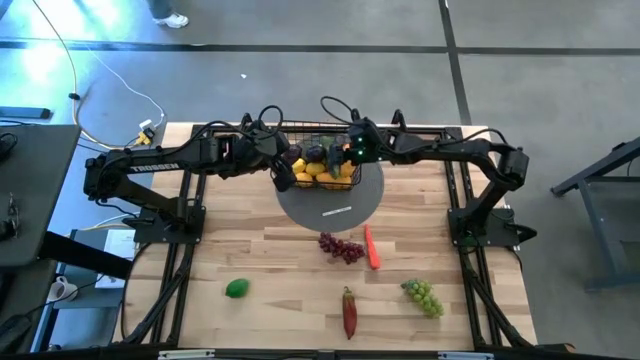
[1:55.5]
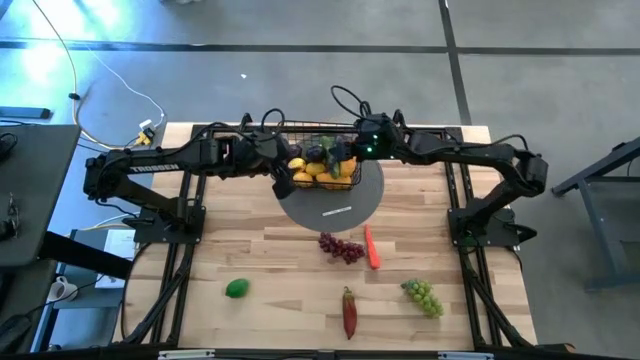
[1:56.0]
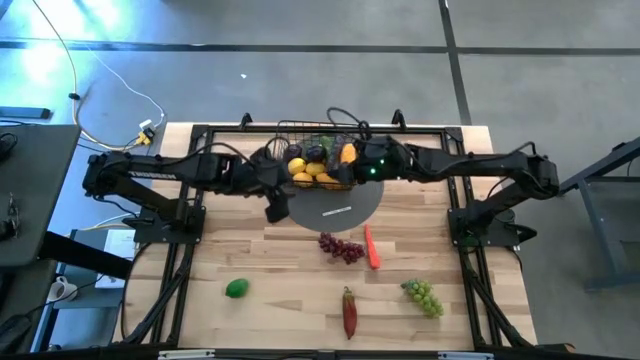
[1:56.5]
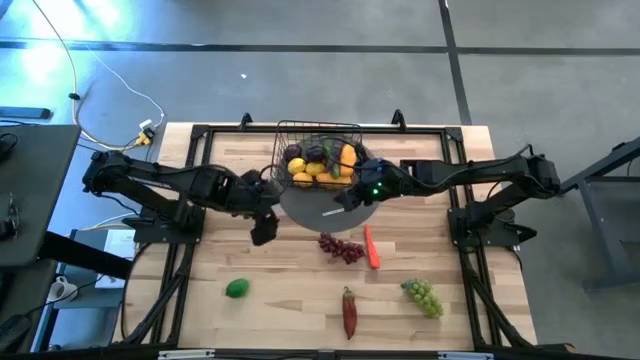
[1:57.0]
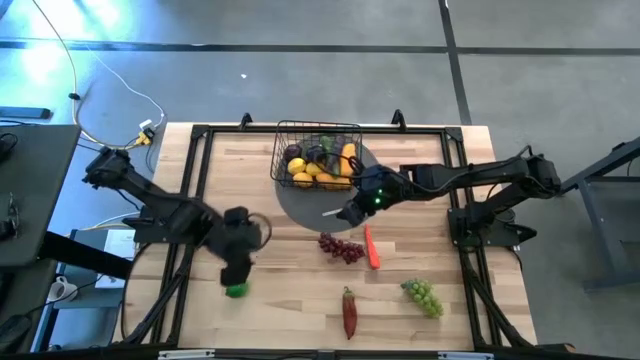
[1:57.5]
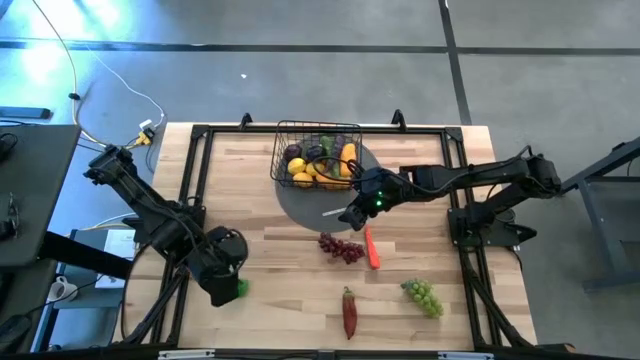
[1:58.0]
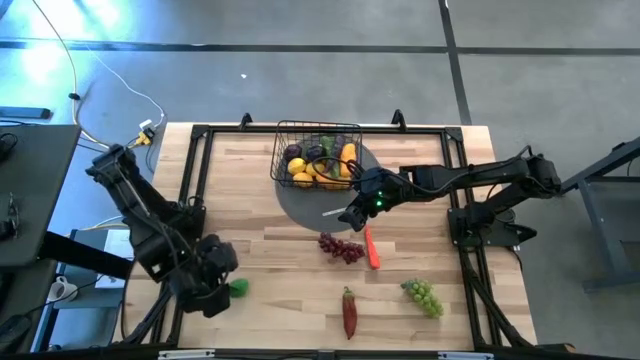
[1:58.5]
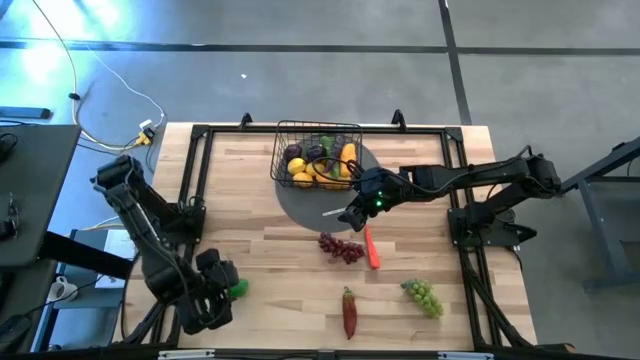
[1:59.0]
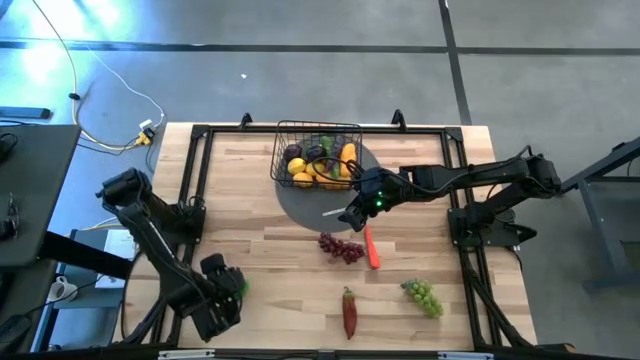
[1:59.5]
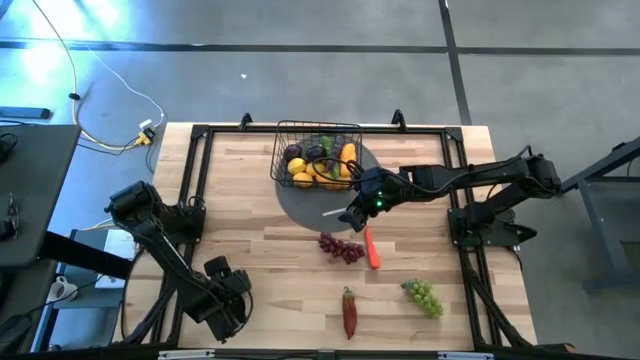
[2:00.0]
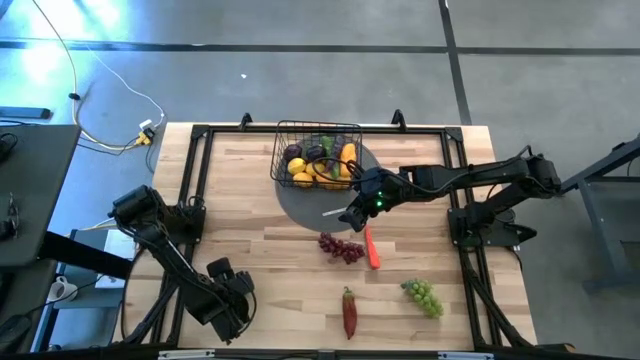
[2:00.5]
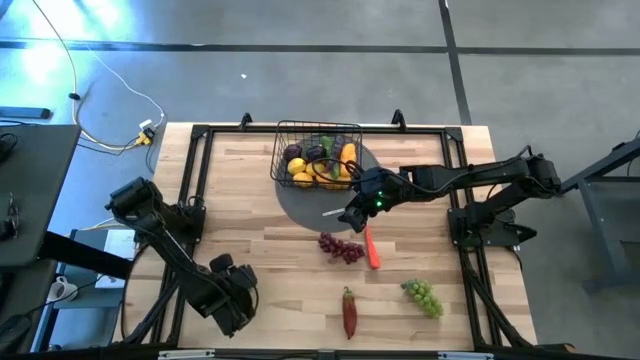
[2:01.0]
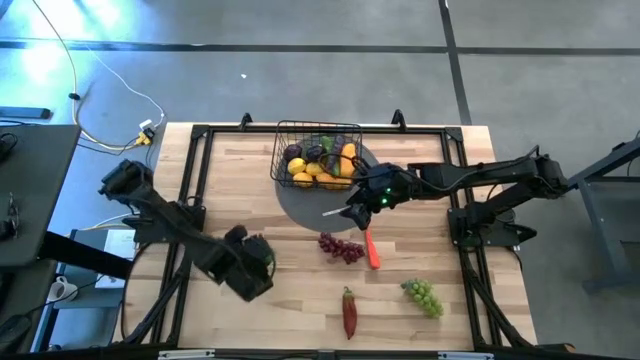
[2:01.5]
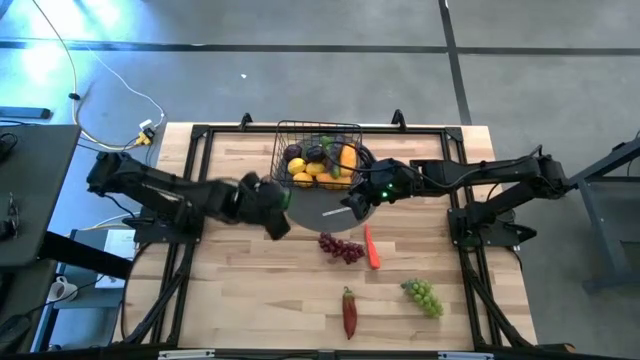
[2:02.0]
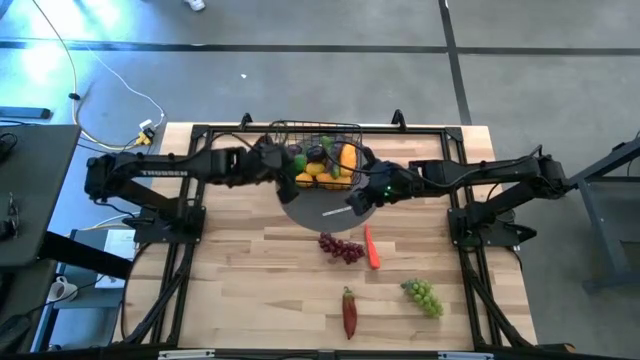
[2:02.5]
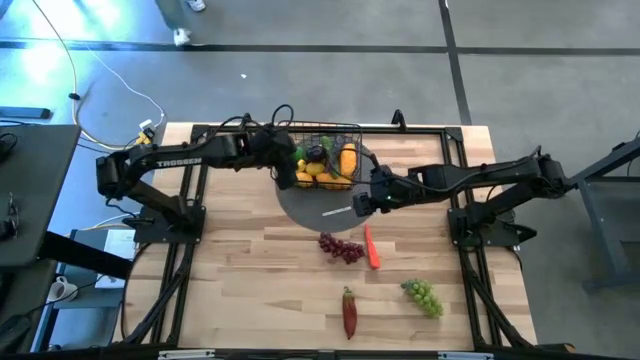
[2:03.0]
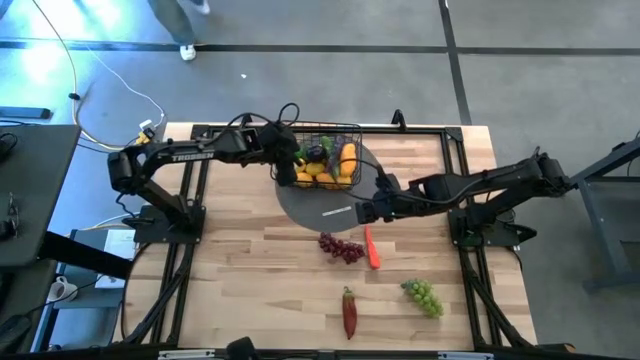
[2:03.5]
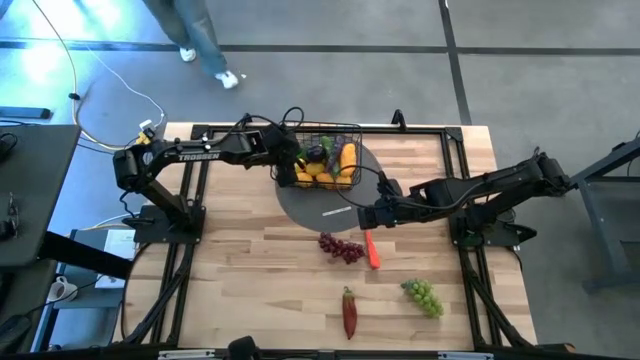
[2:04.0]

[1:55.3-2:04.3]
Task: Build produce basket
Put the green lime into the black wire basket

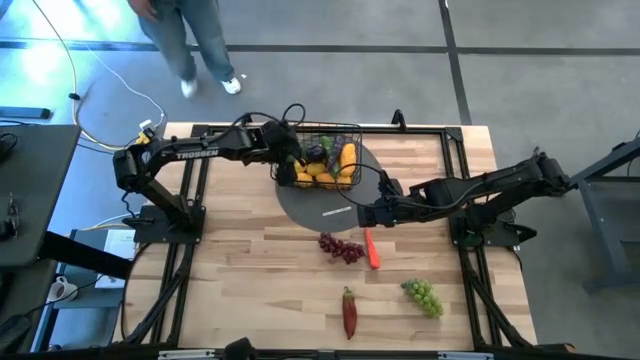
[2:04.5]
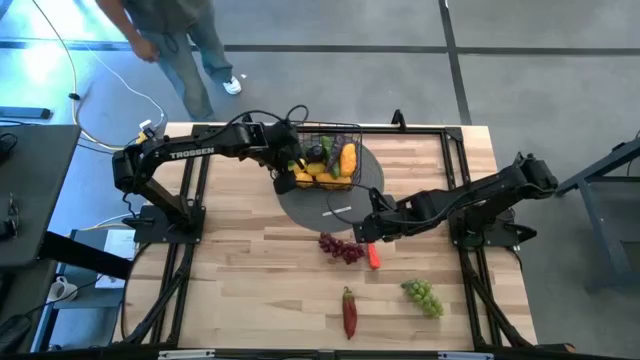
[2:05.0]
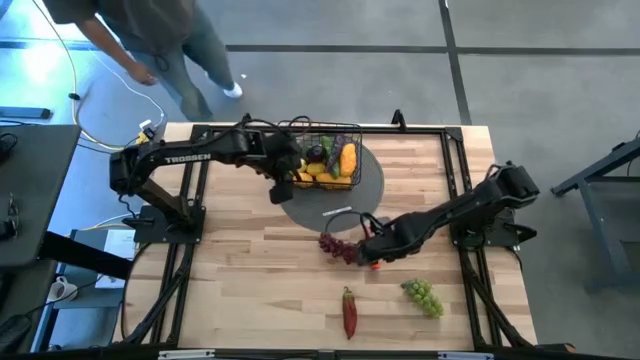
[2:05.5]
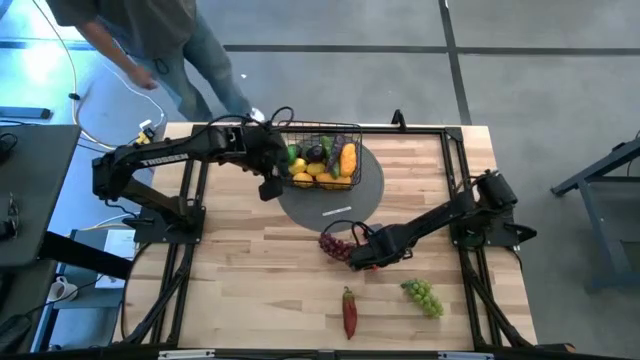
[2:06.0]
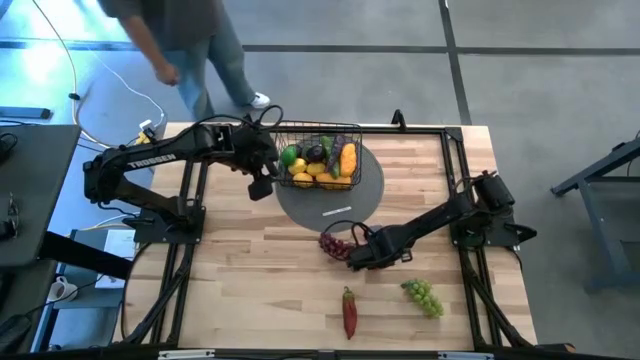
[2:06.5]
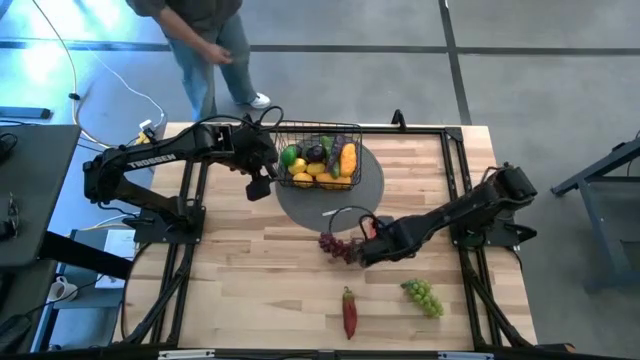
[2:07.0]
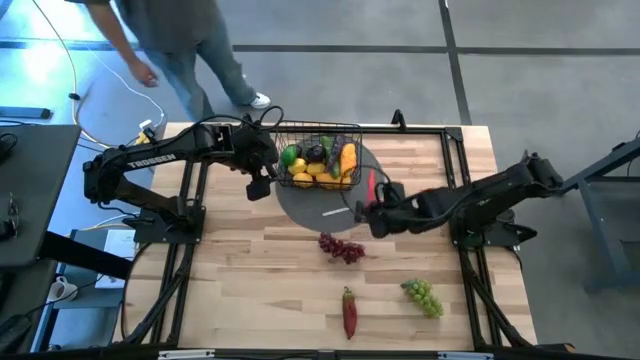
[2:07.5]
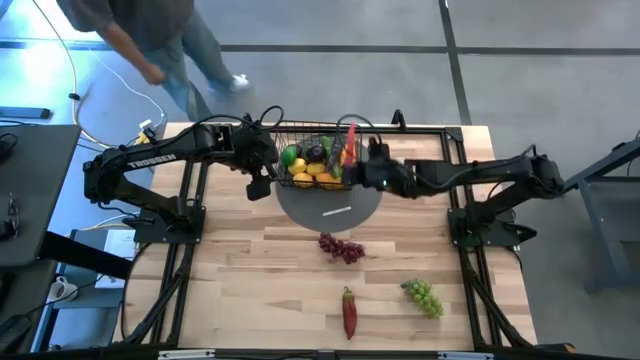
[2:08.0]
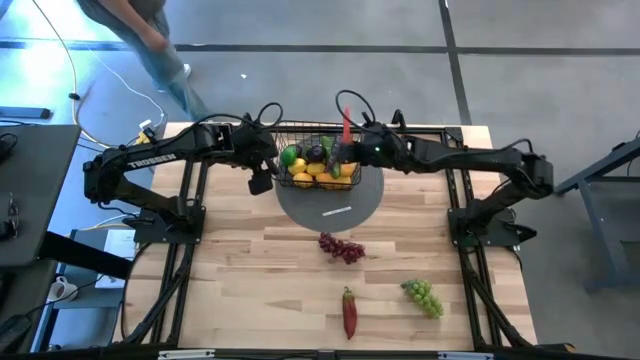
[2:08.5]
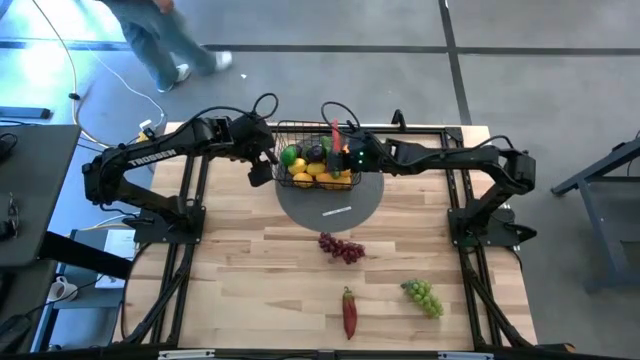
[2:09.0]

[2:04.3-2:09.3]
Put the orange carrot into the black wire basket

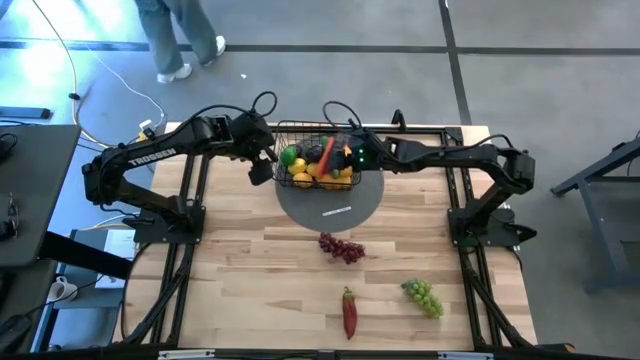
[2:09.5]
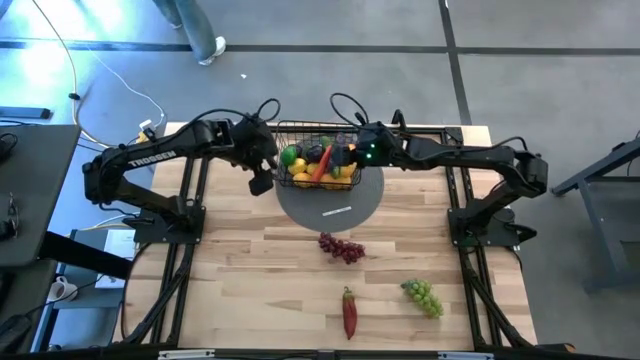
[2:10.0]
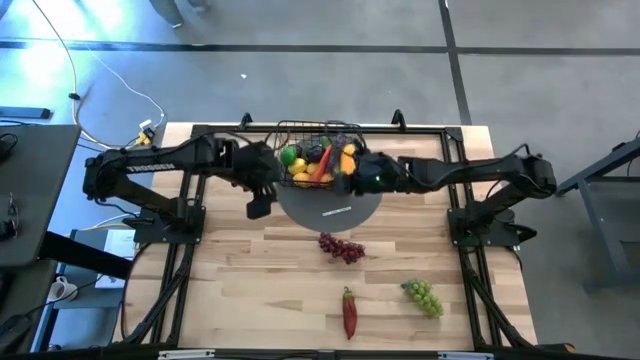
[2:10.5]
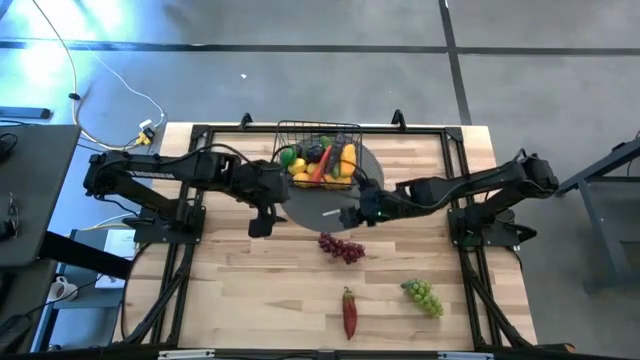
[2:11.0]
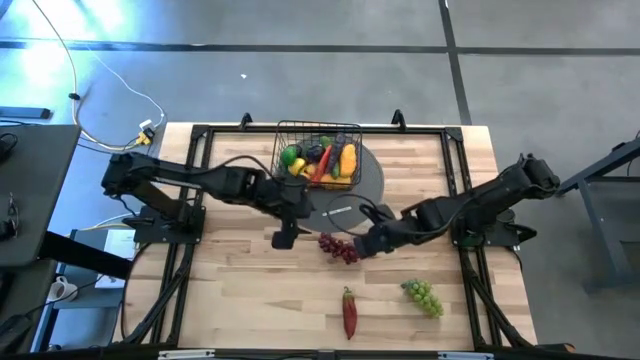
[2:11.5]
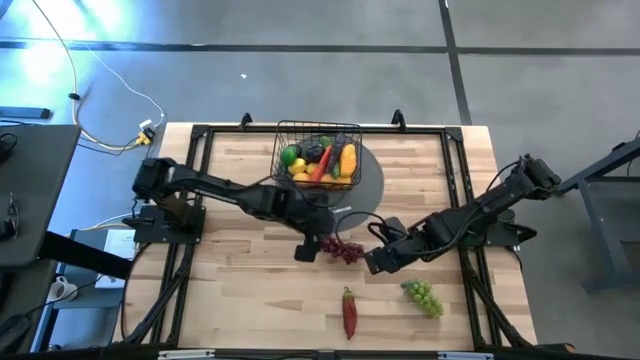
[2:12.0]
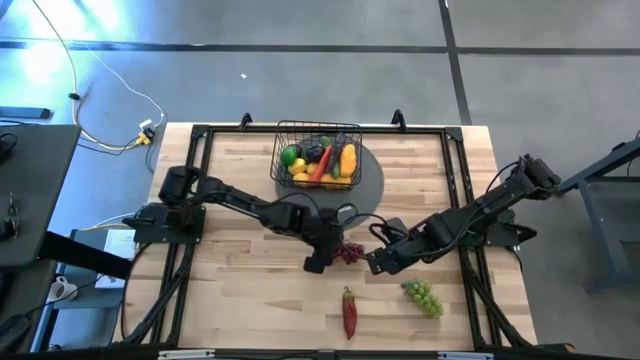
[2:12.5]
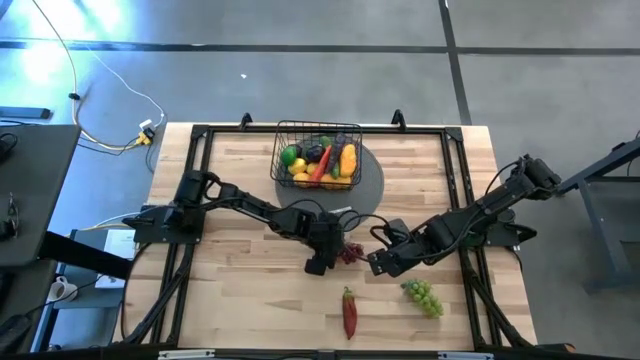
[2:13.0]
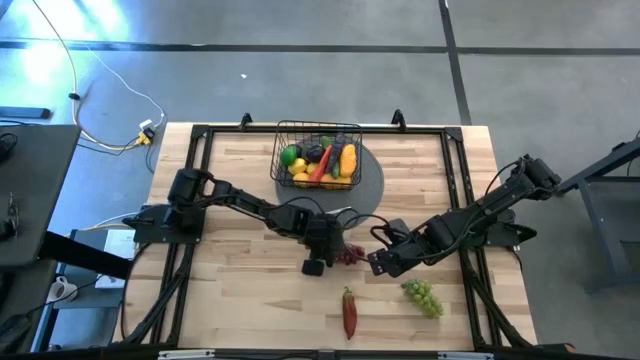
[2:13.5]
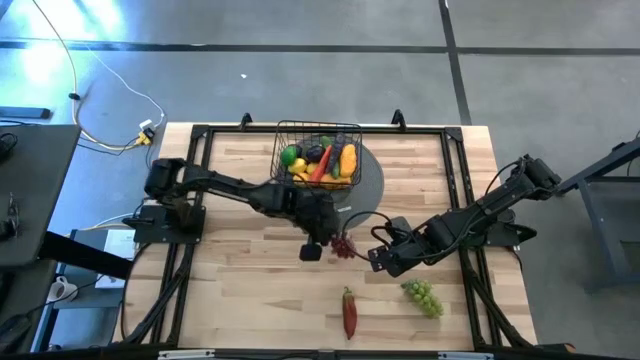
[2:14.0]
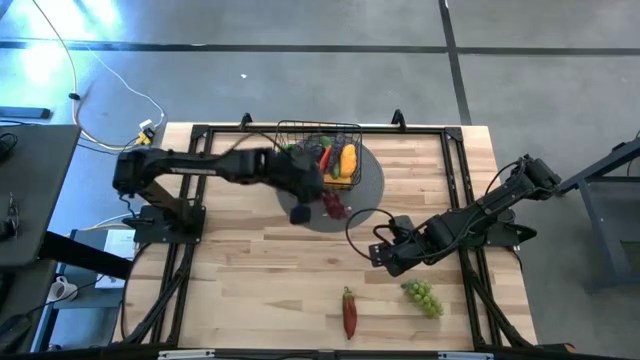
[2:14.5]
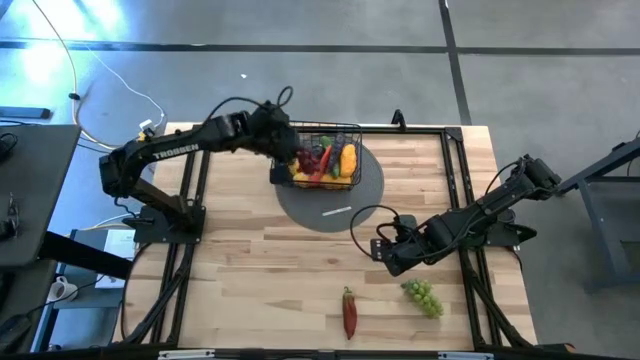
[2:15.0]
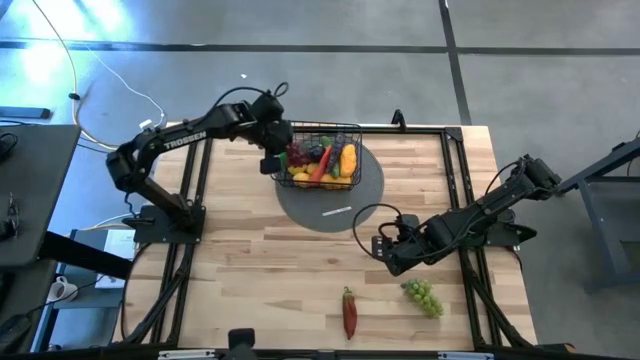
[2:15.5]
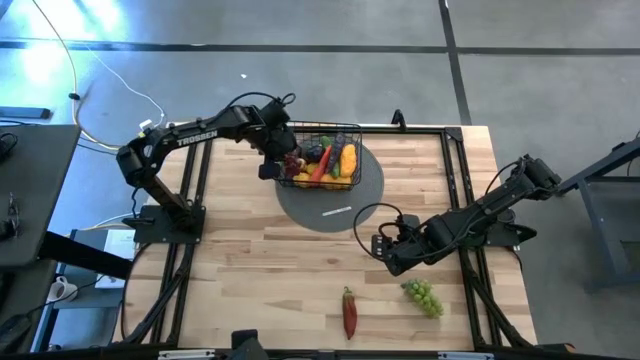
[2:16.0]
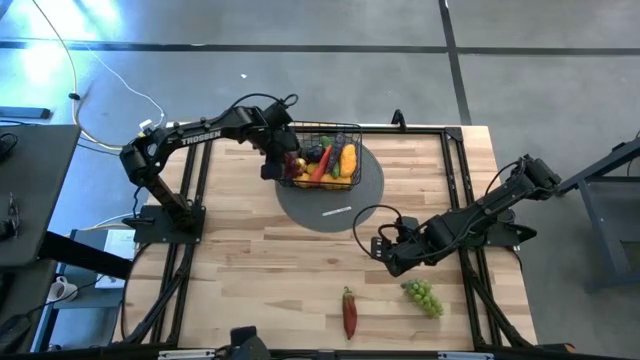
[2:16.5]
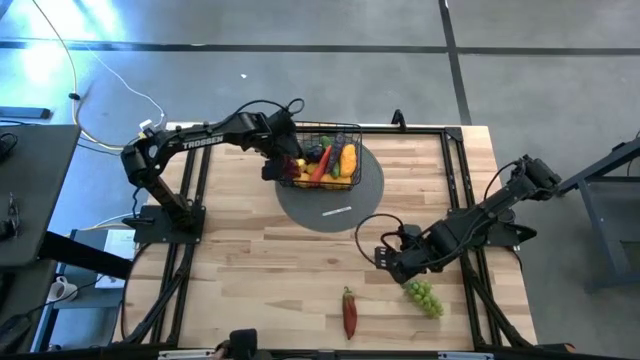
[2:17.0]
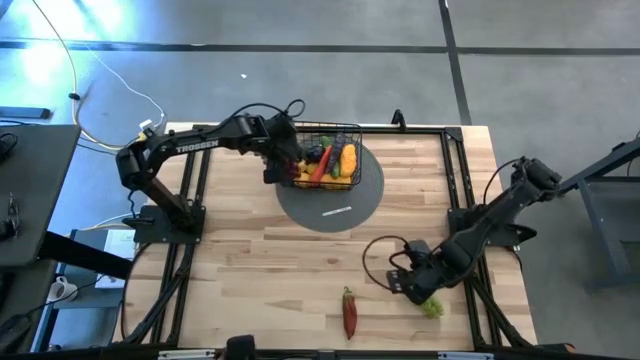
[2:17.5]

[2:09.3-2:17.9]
Put the purple grapes into the black wire basket
